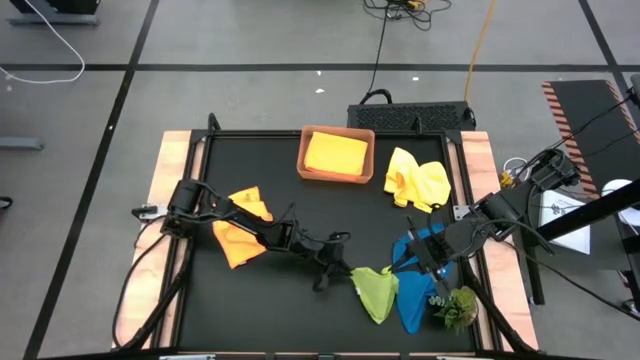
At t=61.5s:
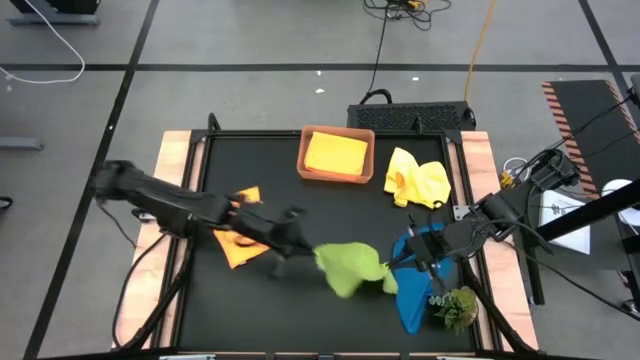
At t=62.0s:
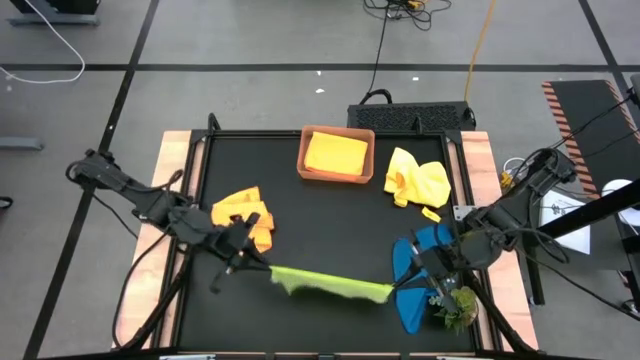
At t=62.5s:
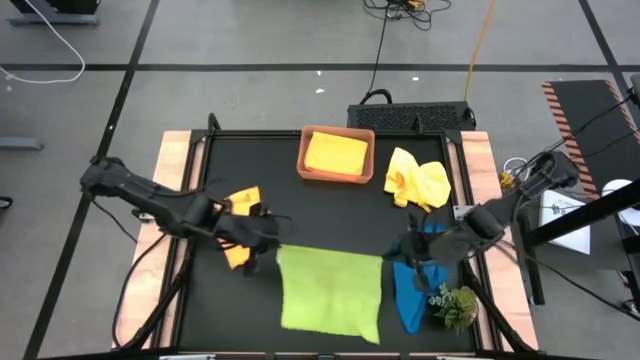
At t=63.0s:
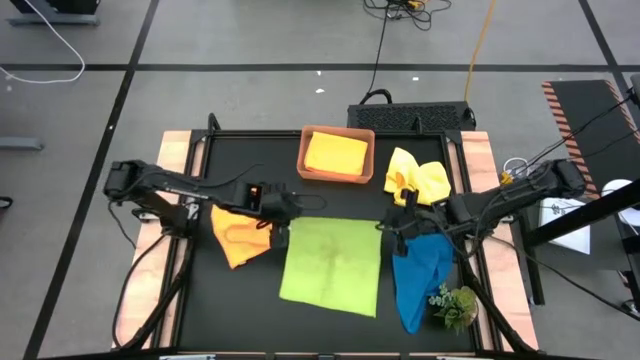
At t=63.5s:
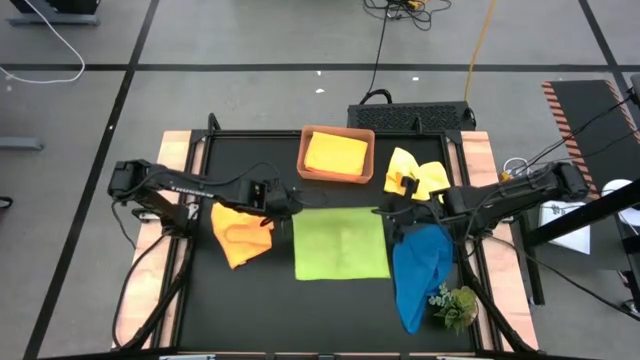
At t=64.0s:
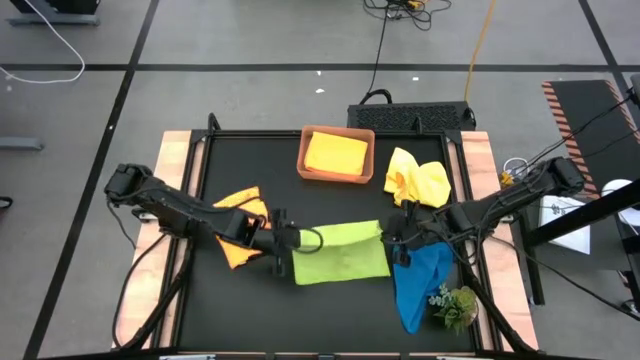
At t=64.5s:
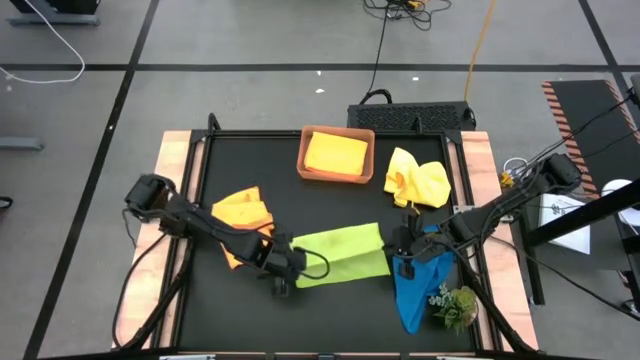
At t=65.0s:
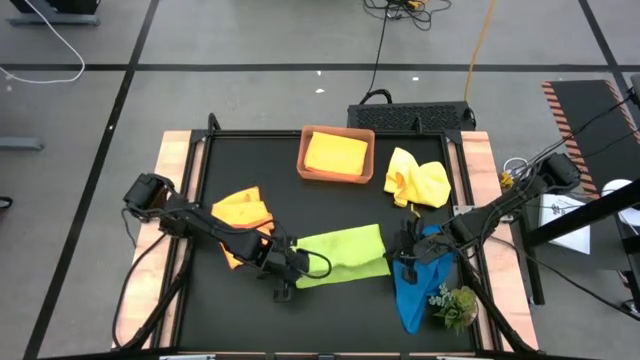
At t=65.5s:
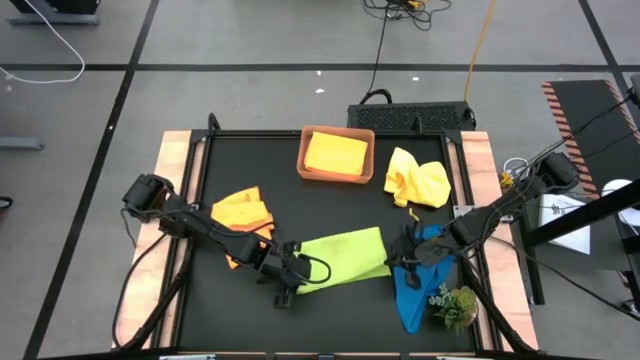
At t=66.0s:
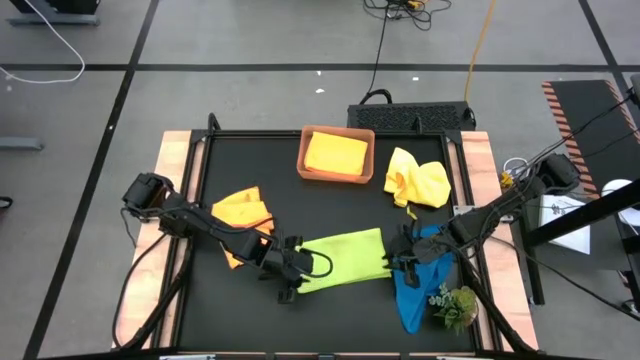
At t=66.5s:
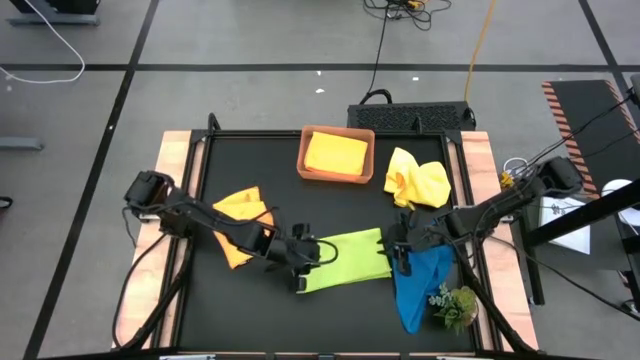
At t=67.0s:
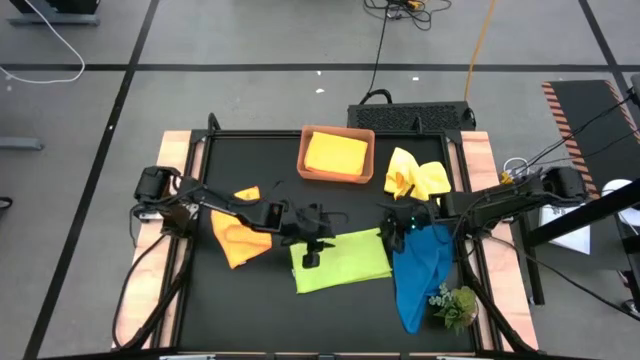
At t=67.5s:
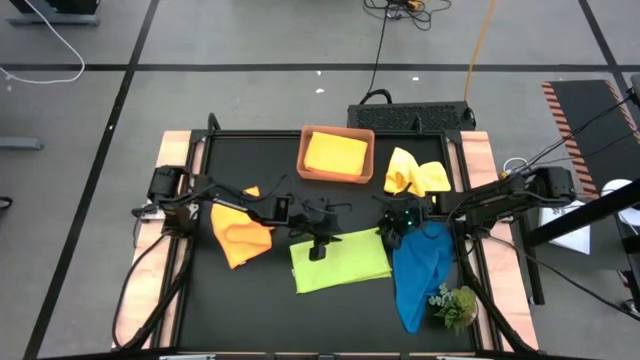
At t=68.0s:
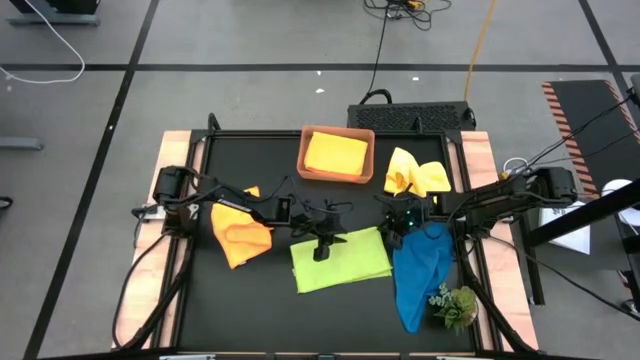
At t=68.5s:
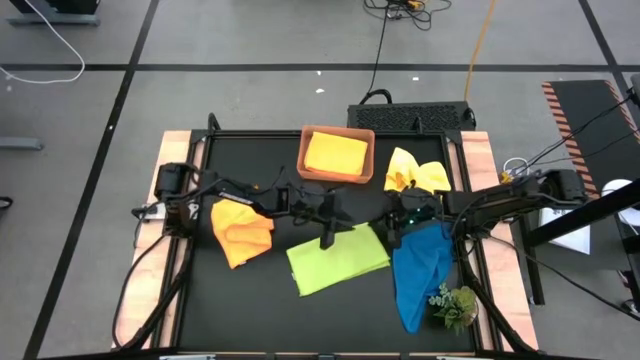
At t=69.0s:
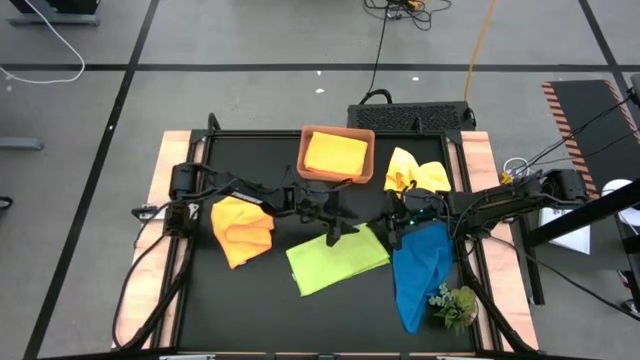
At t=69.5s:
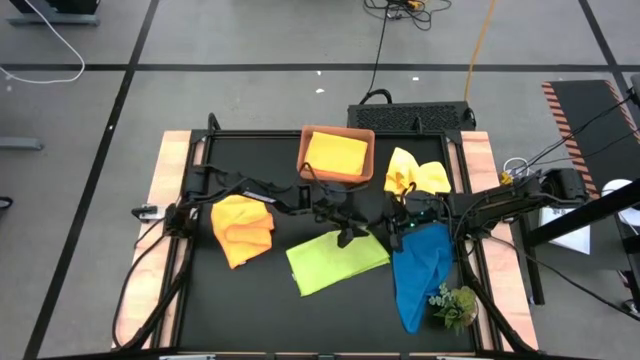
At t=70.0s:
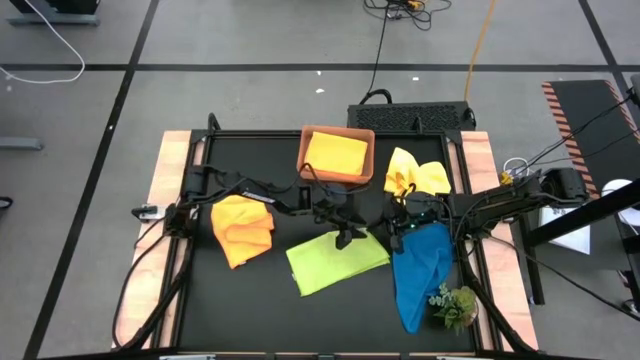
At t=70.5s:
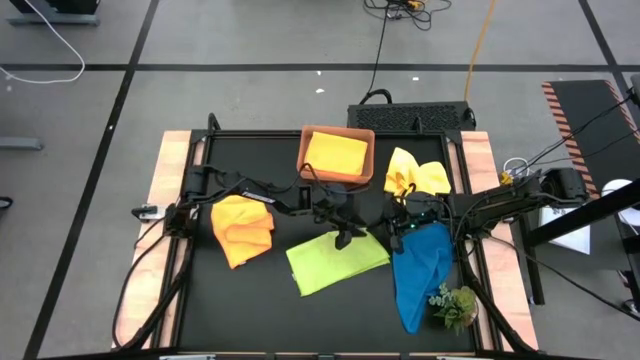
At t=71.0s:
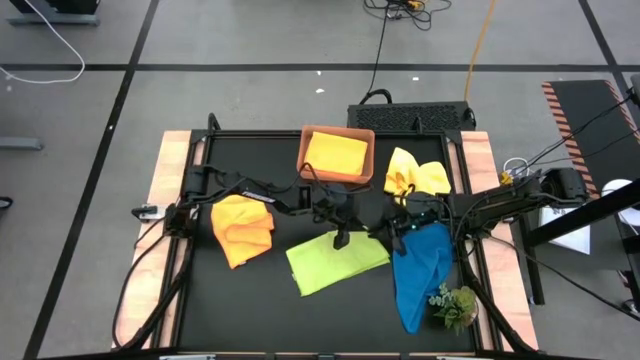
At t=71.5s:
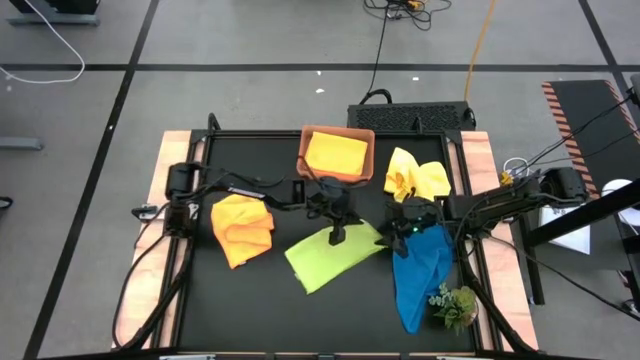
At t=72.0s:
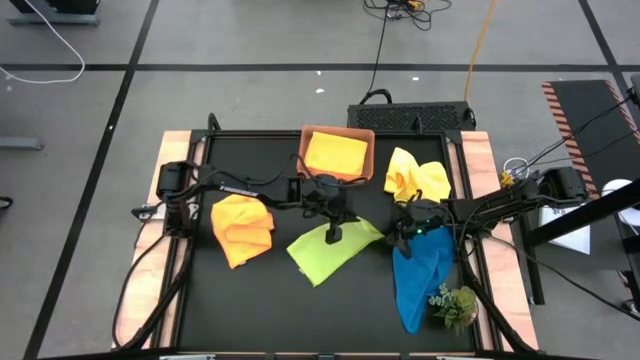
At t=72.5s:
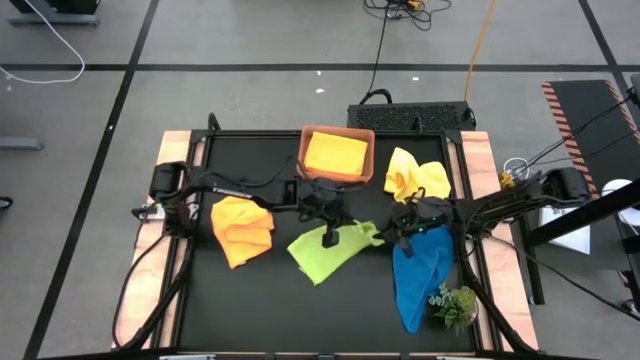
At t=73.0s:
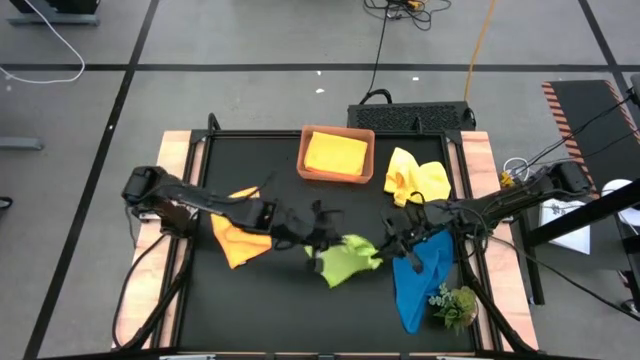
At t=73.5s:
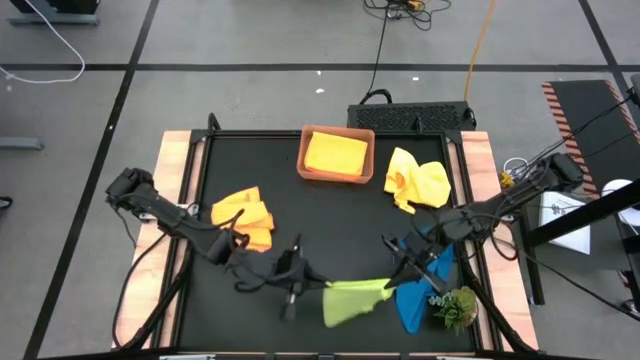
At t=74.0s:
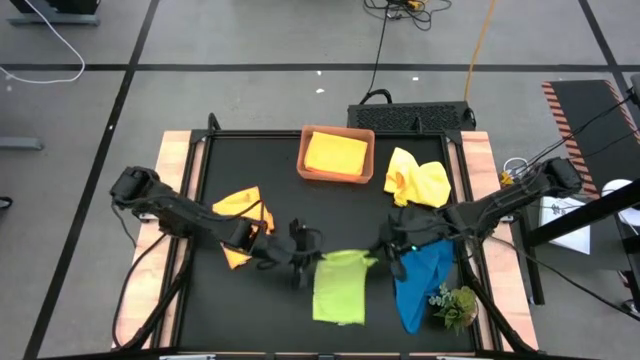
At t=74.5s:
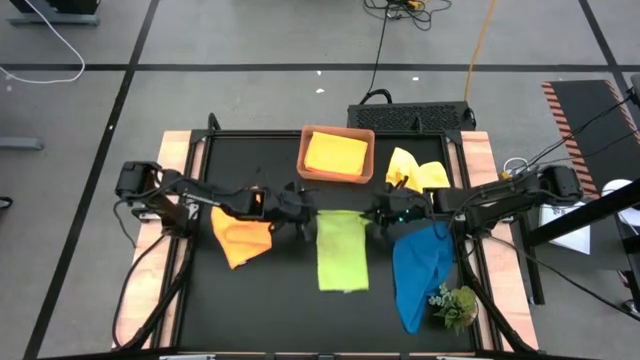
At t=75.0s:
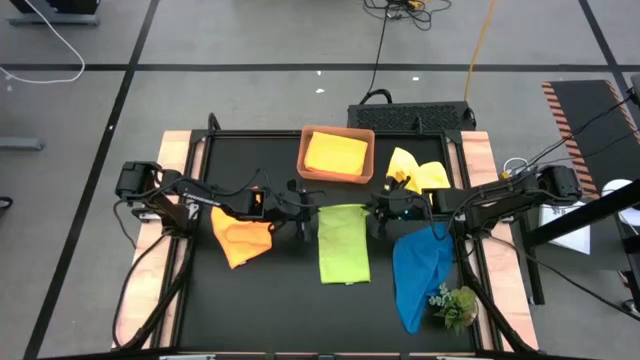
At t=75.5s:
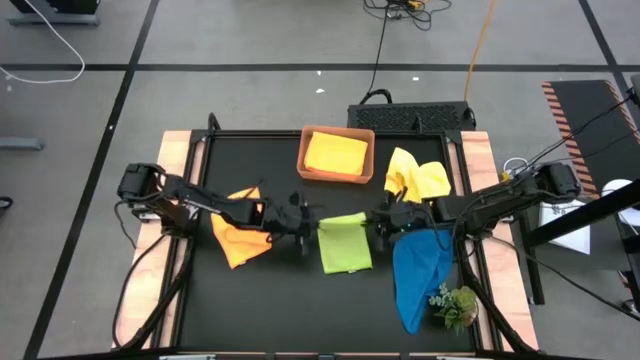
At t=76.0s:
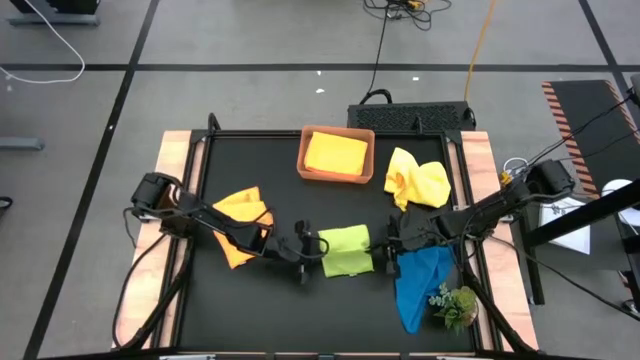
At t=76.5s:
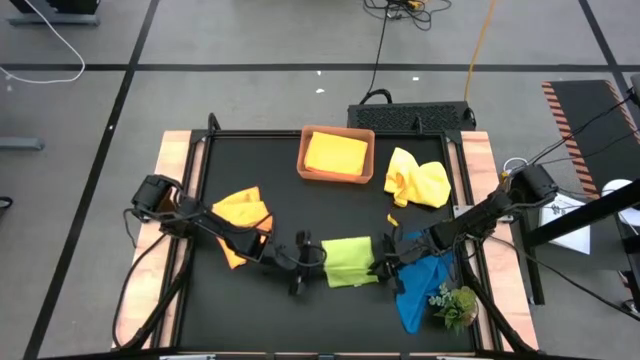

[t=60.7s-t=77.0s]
Task: Fold microfiber towels
Fold the light green microfiber towel

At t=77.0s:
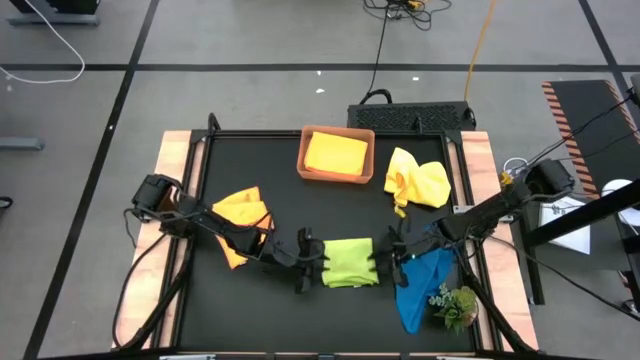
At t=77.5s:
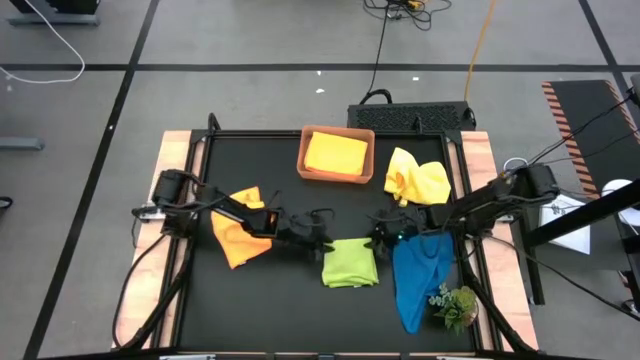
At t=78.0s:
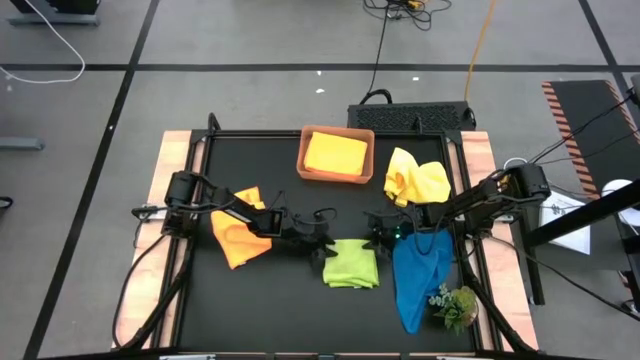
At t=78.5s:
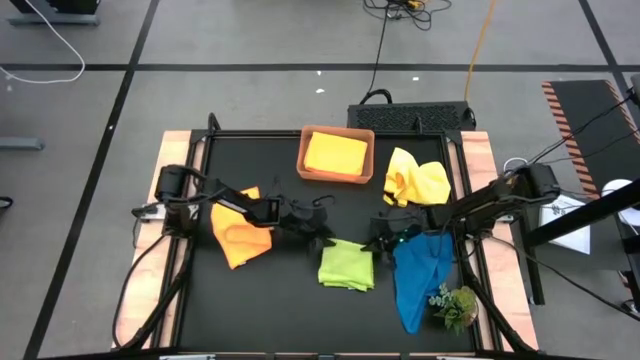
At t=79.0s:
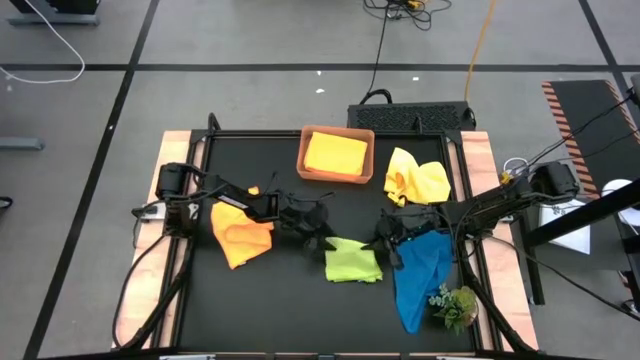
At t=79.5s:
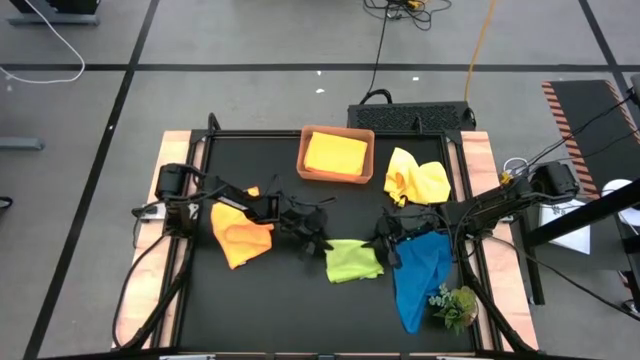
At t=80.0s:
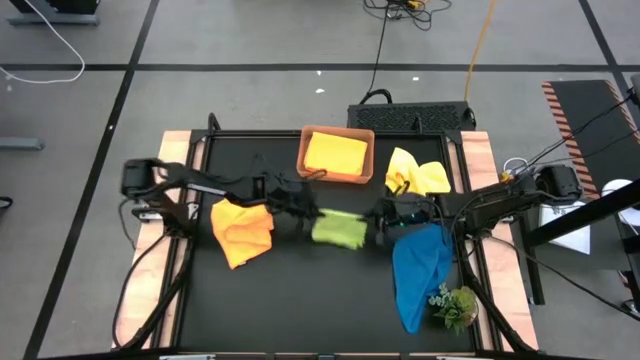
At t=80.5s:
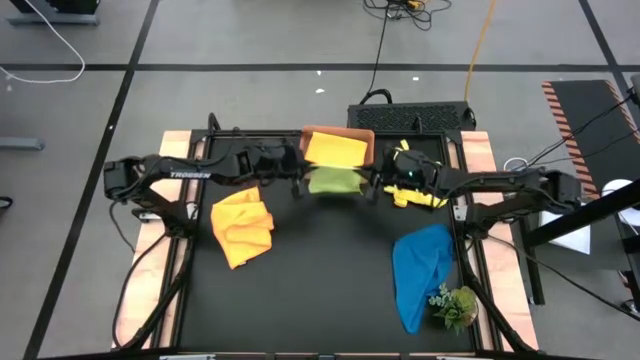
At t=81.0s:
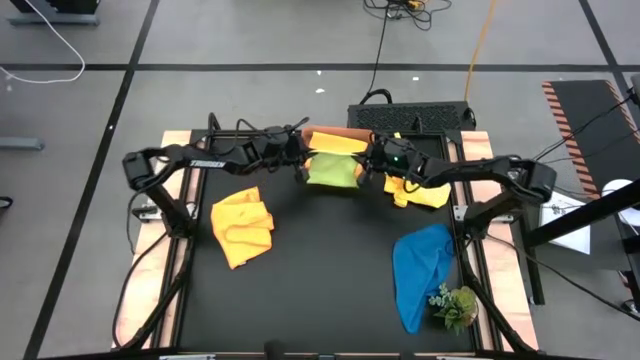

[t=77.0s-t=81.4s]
Put the green microfiber towel into the orange bin
